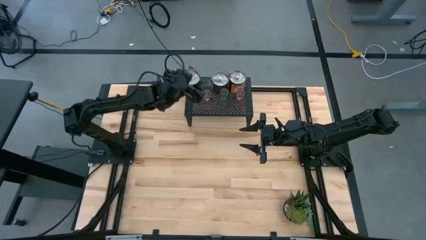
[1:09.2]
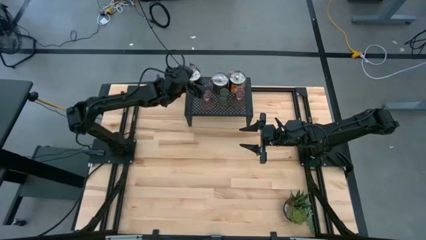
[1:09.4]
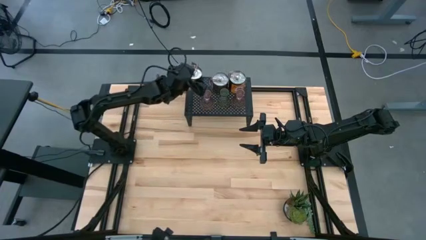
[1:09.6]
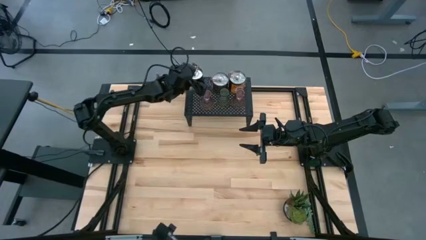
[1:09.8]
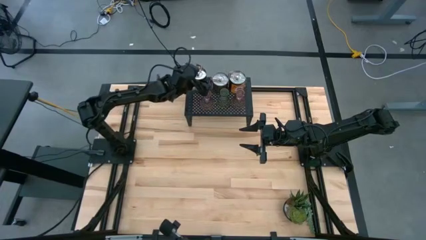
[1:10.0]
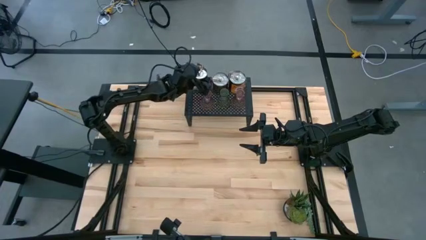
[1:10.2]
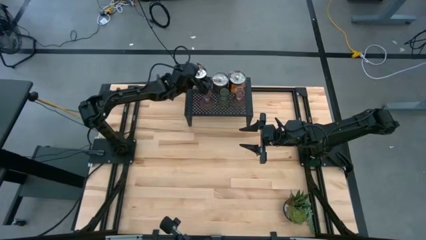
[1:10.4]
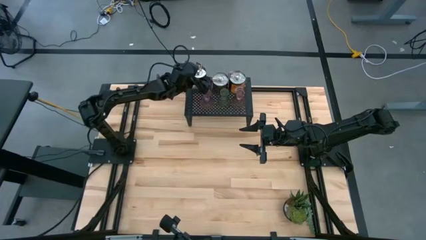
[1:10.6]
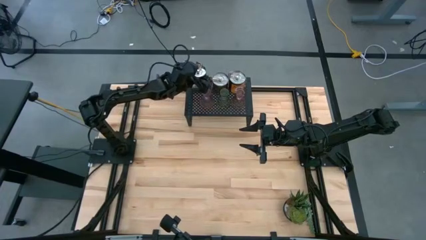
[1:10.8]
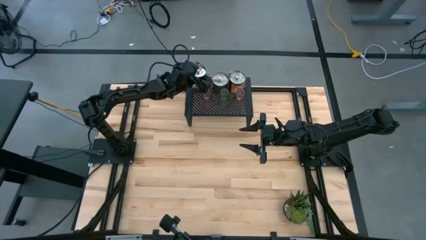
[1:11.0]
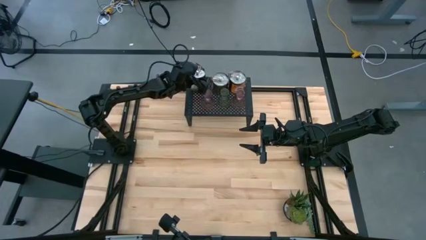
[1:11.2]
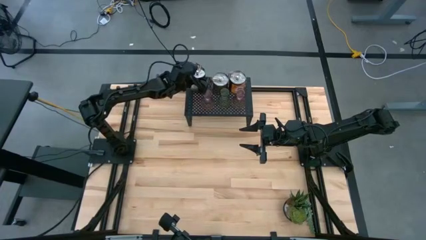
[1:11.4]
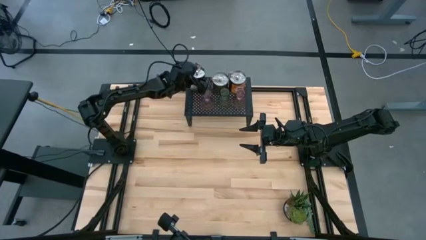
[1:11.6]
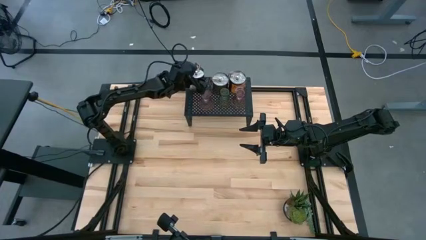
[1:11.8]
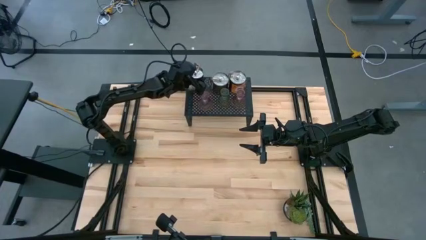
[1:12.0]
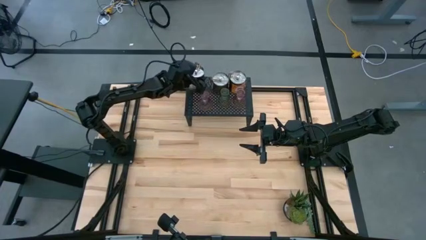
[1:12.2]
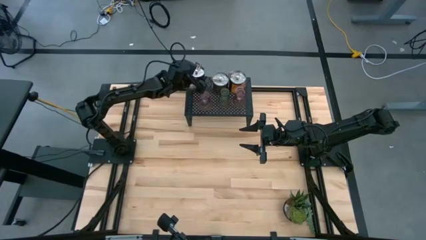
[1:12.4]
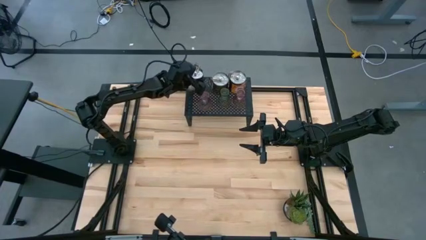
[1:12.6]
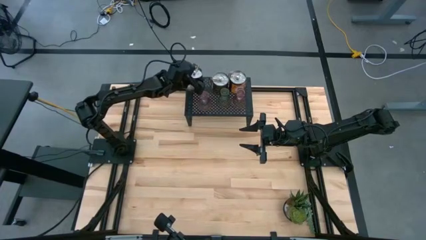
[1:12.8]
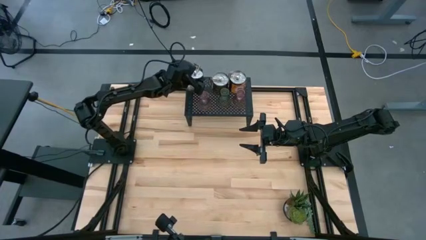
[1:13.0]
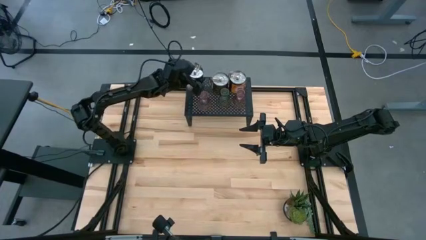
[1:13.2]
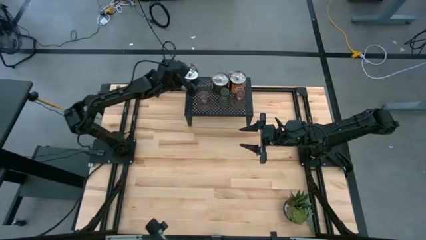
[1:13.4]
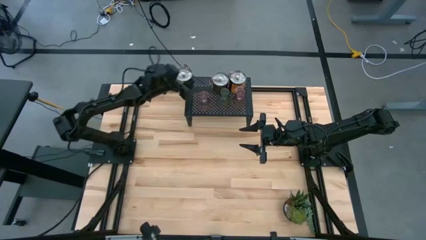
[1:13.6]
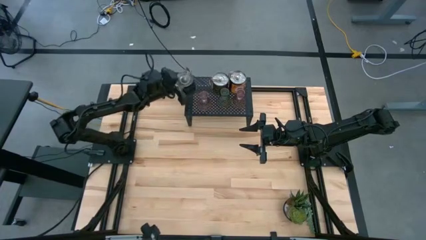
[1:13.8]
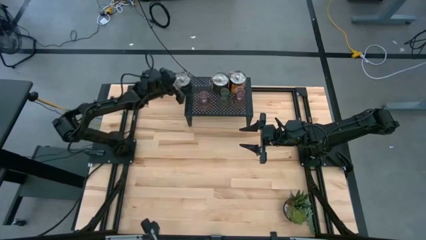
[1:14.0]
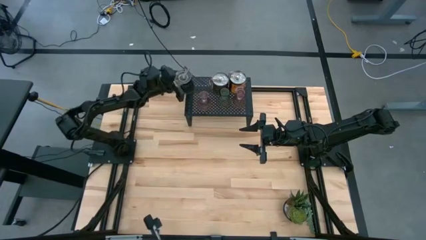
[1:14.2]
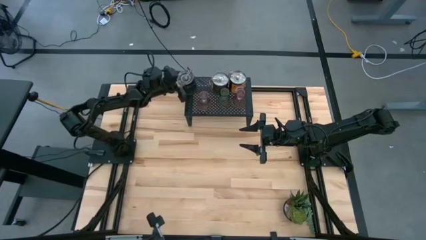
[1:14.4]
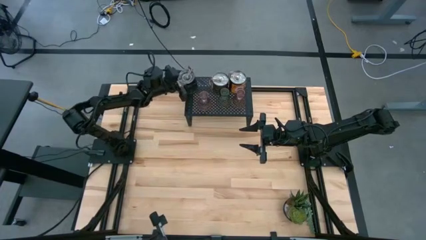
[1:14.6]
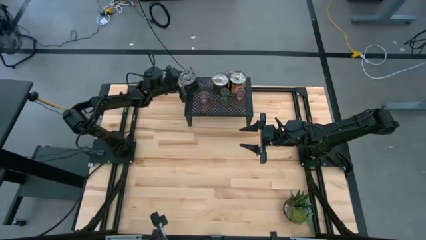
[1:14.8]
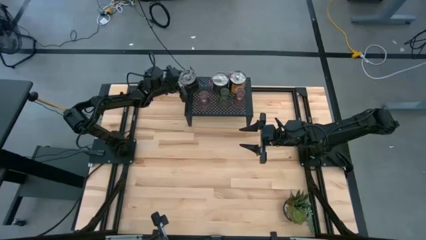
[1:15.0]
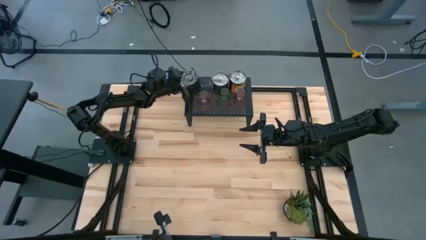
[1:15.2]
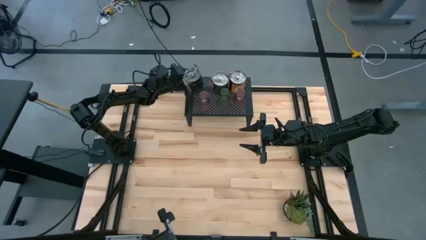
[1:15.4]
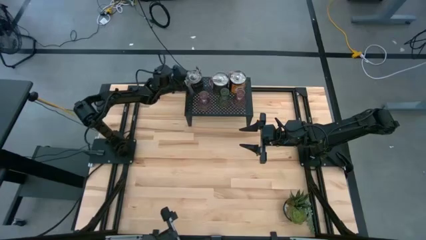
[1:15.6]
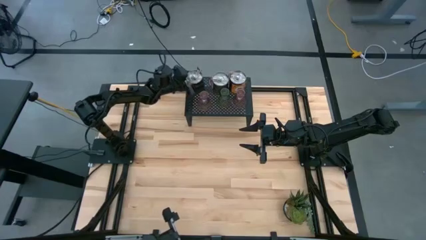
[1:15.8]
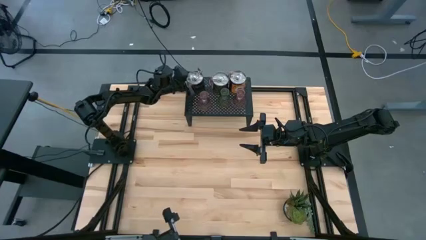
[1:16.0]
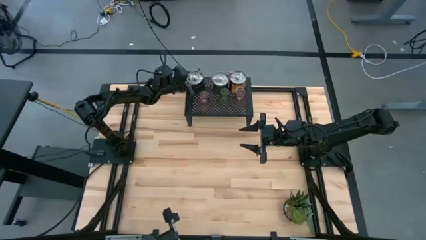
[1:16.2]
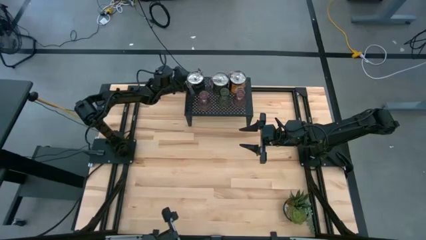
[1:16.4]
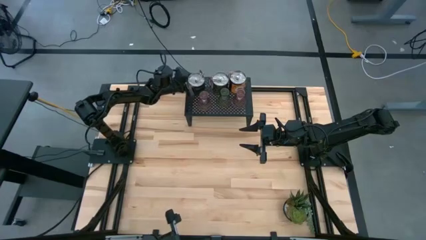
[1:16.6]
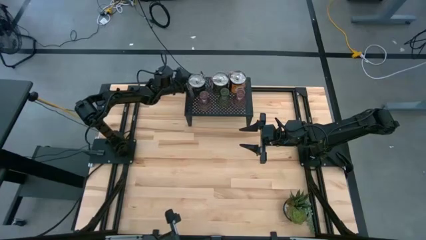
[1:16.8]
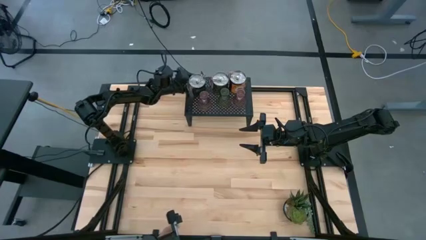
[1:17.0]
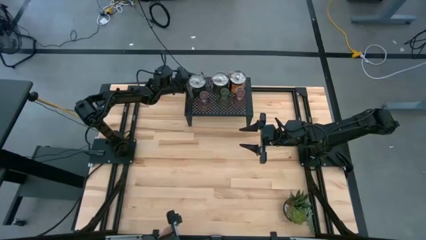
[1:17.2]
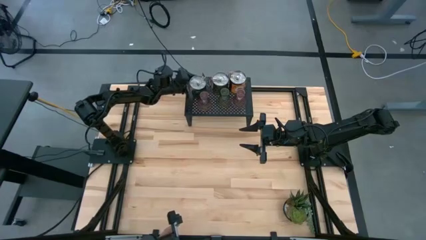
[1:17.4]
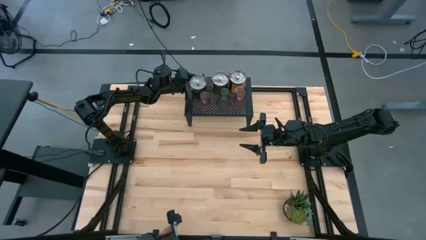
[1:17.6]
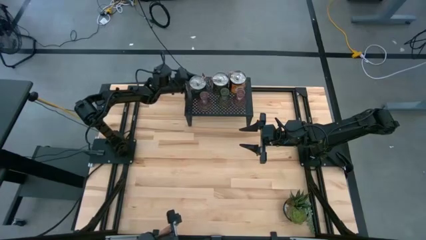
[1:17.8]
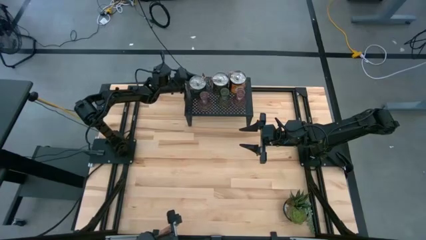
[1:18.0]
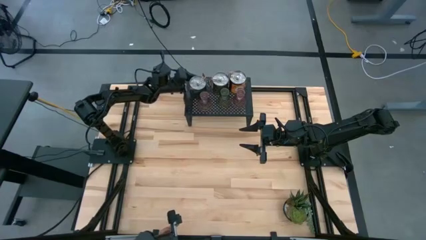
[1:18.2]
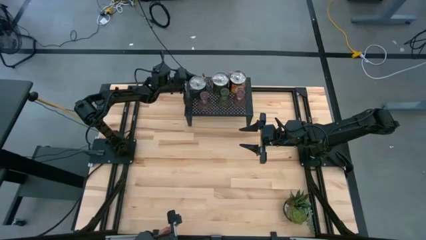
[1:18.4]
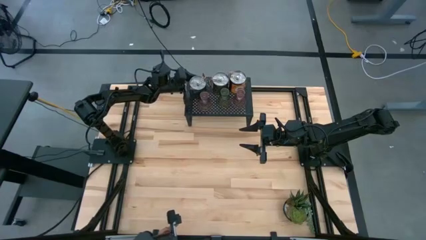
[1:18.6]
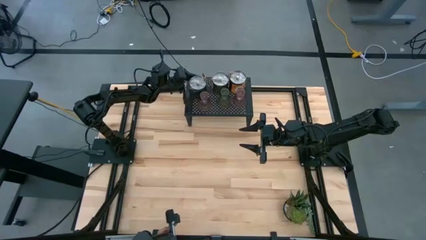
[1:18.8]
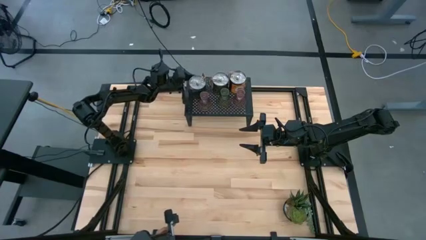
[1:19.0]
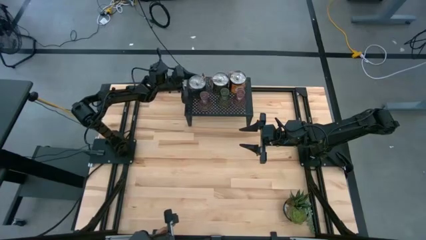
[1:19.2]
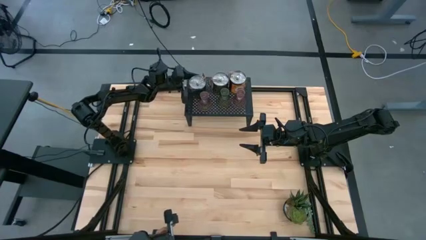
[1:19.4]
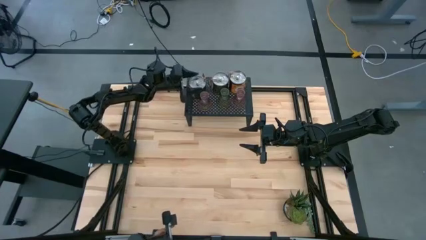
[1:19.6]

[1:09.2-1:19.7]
Task: Pick & Place candle stick holders
Put the silver scented candle on the shelf aligned with the other scented candles

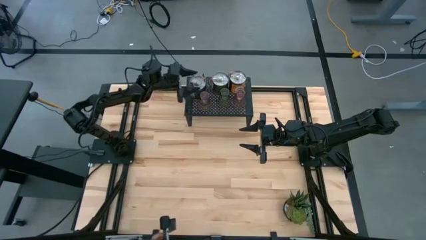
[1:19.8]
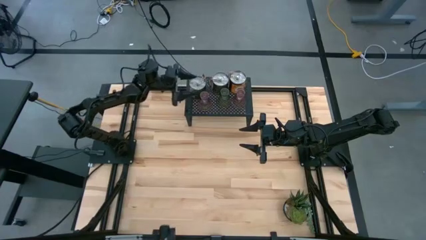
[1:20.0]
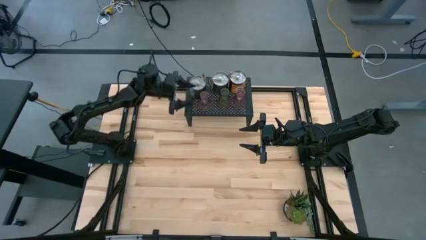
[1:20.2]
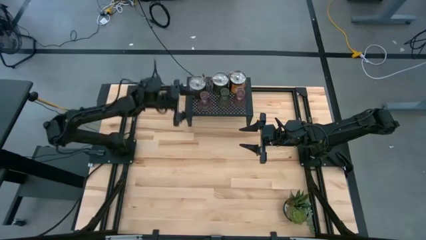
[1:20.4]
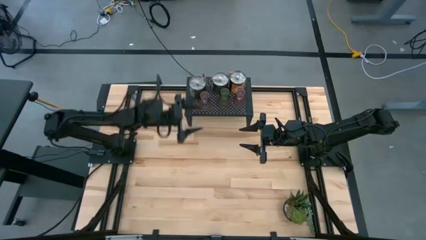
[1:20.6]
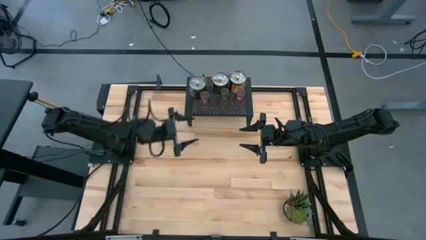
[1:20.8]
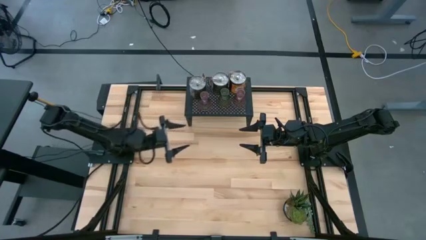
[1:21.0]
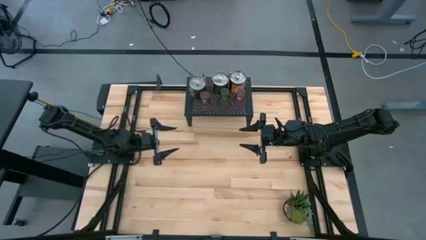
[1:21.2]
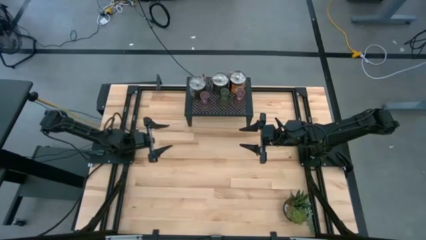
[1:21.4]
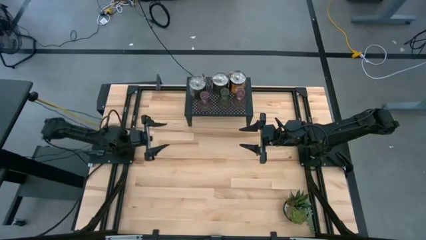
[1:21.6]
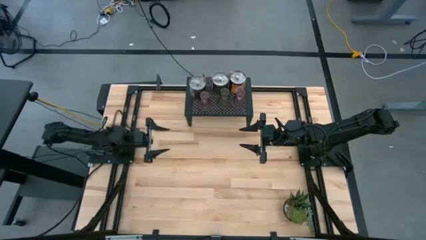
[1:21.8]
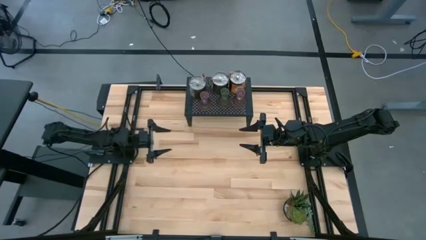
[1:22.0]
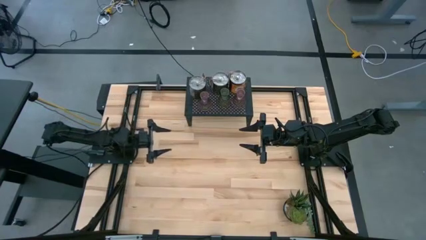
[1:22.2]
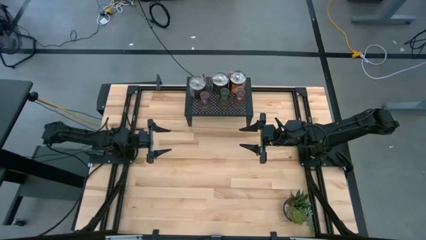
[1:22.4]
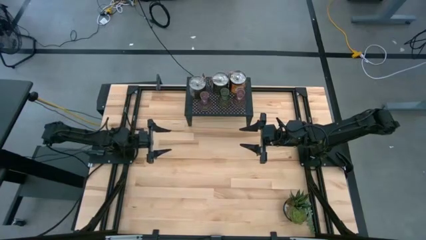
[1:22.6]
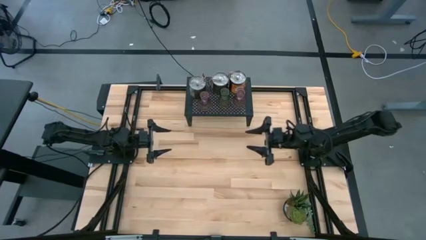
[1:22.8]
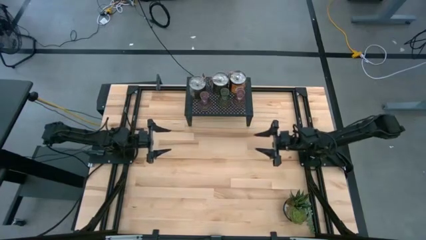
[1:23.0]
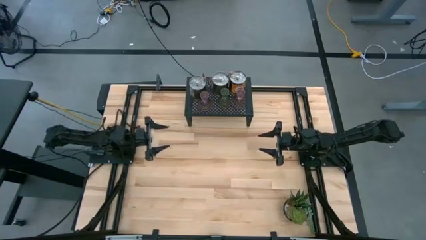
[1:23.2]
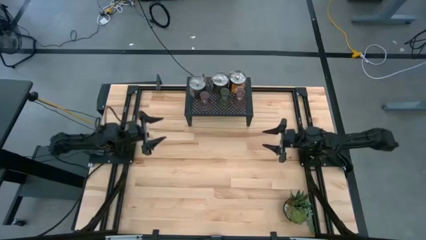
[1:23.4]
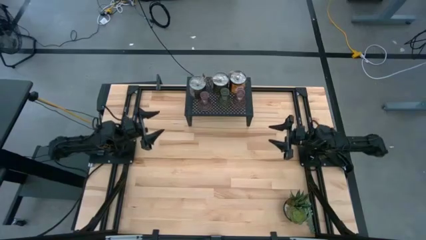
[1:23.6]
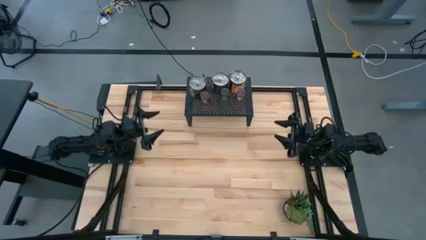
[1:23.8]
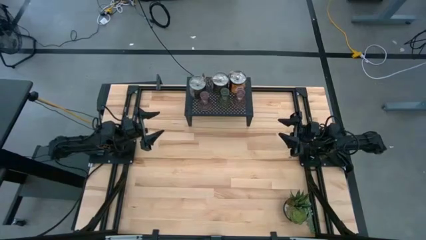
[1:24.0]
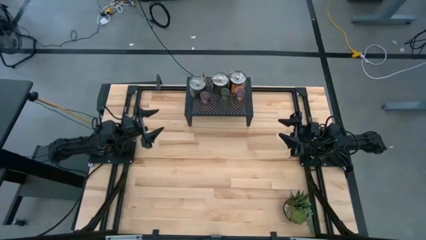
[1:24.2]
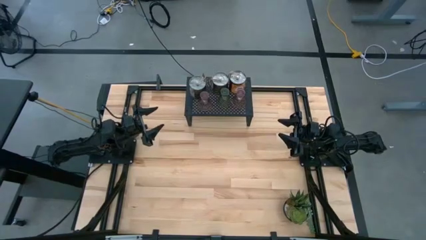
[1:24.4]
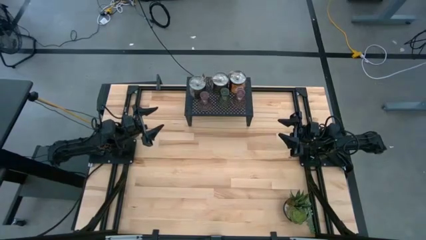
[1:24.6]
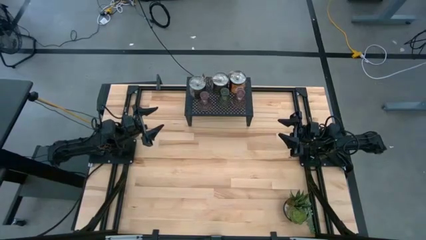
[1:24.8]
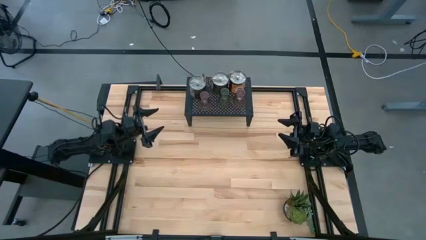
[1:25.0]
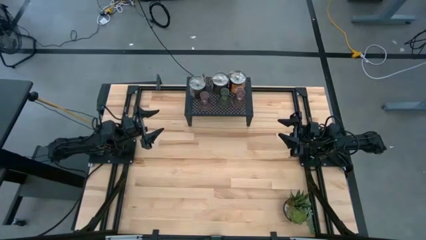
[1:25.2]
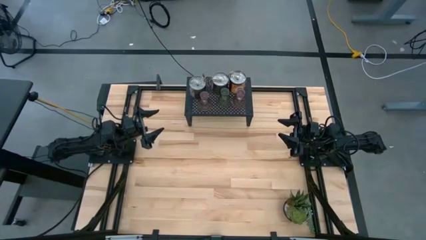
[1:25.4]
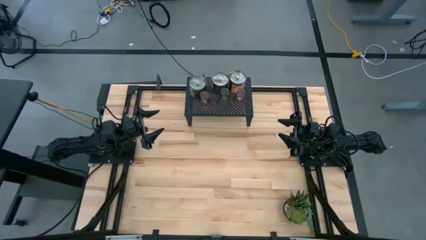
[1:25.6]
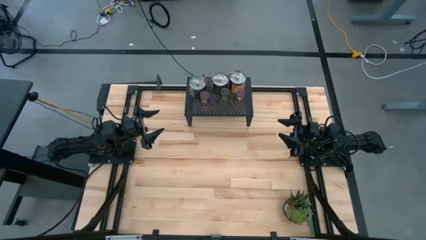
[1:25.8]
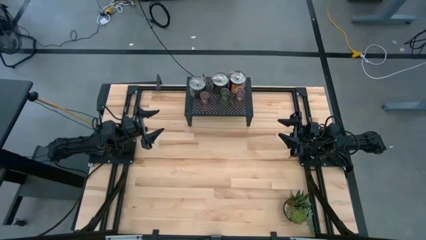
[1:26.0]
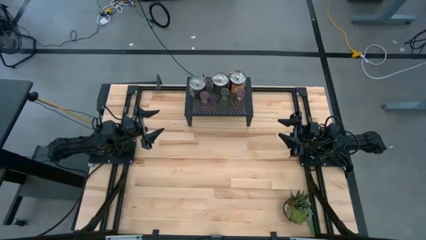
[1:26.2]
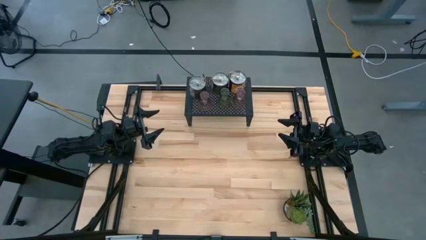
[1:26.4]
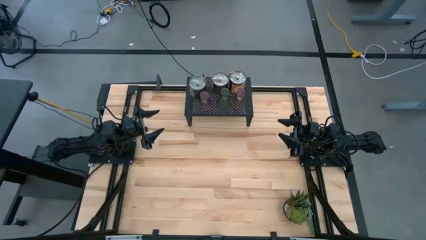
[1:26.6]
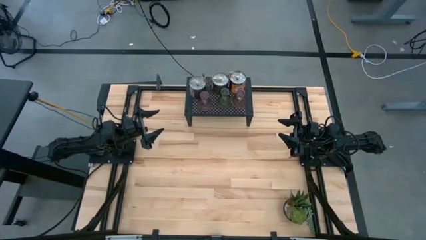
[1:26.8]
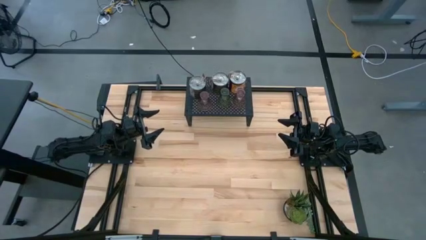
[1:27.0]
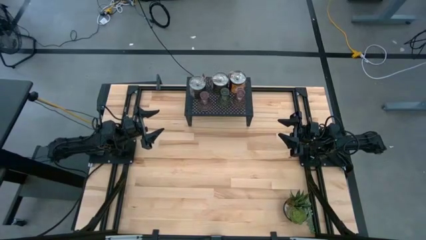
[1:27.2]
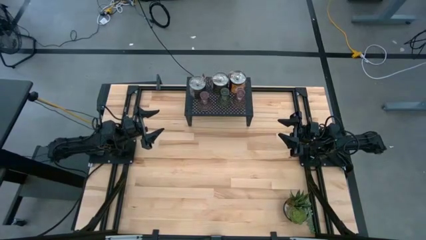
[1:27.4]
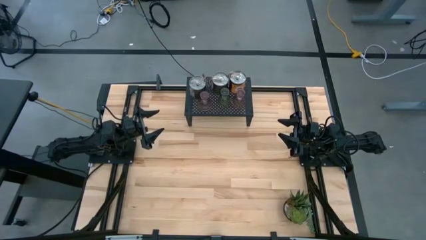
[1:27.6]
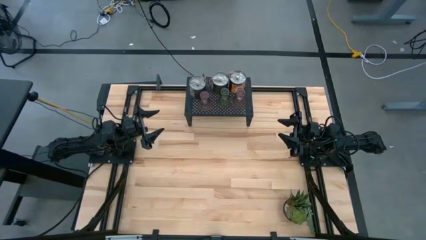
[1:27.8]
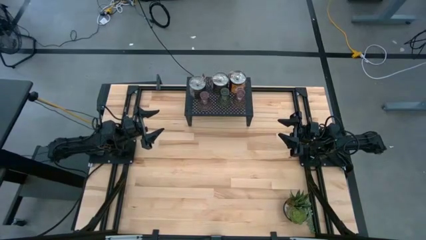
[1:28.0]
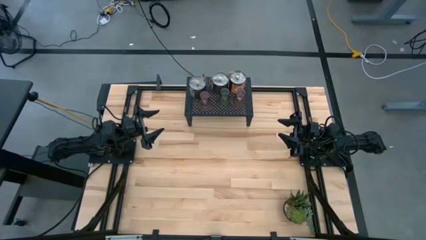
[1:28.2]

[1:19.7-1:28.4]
Return to Home Position
